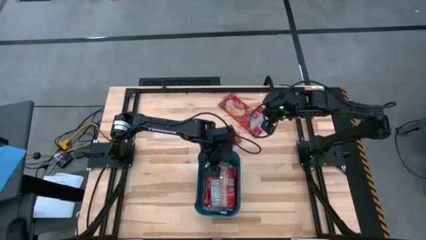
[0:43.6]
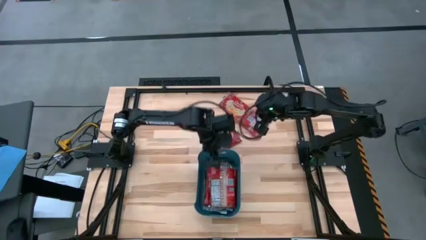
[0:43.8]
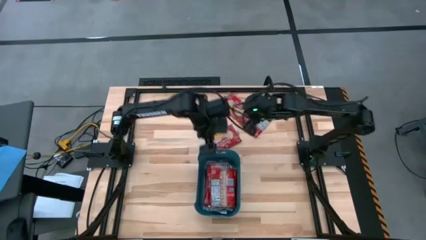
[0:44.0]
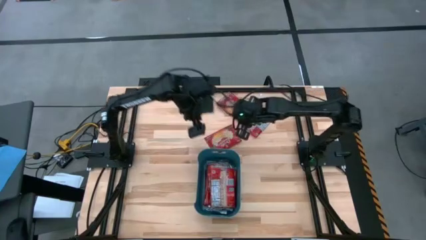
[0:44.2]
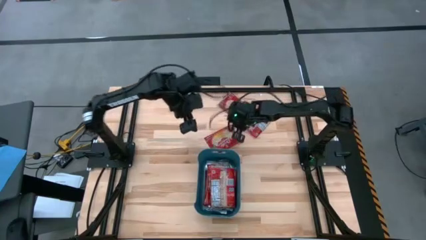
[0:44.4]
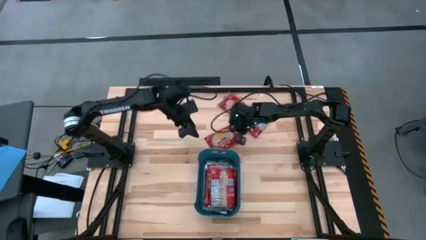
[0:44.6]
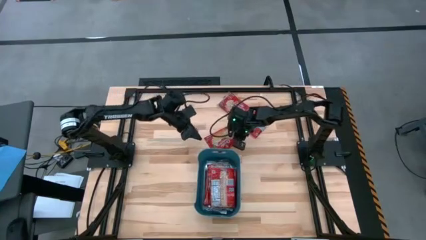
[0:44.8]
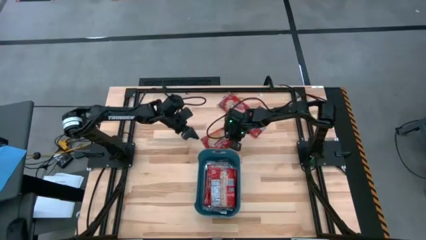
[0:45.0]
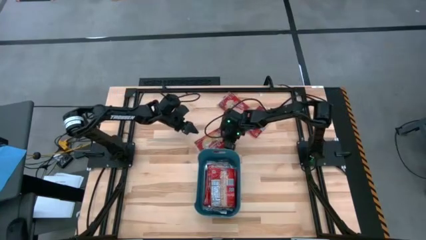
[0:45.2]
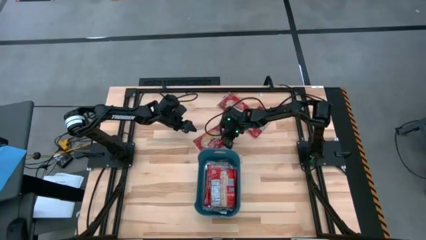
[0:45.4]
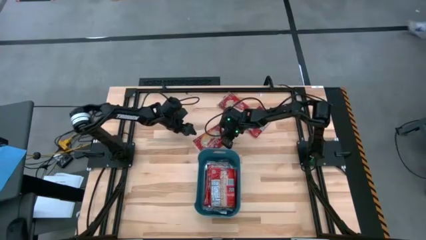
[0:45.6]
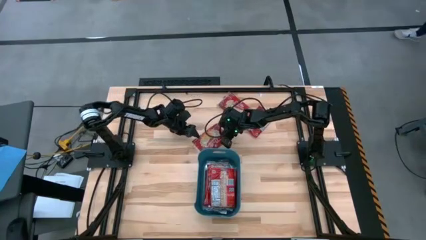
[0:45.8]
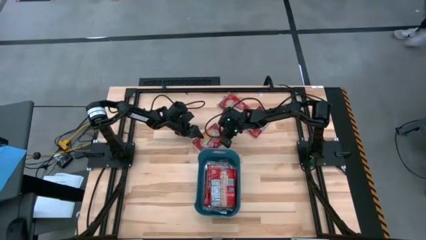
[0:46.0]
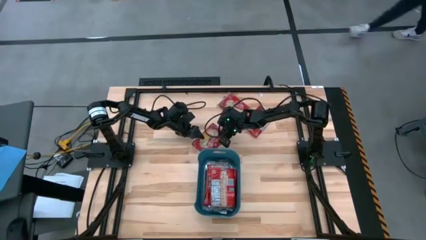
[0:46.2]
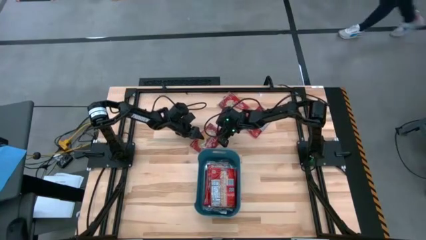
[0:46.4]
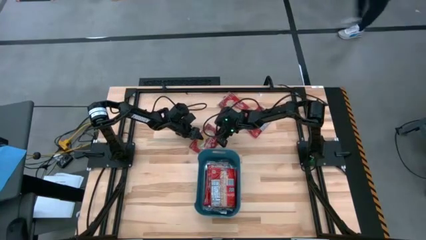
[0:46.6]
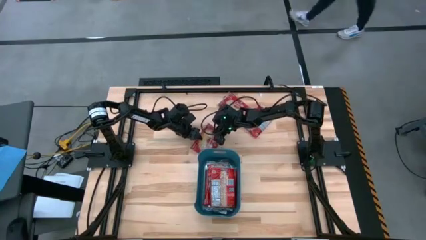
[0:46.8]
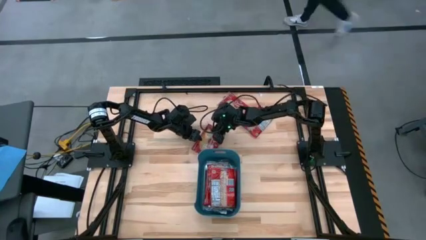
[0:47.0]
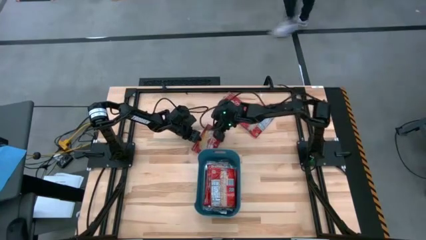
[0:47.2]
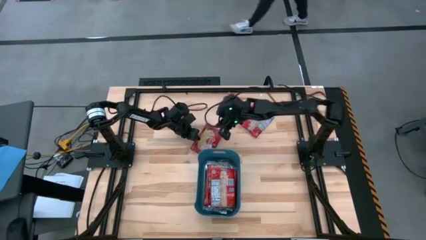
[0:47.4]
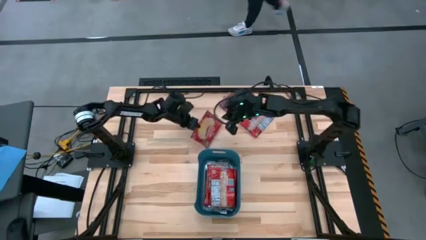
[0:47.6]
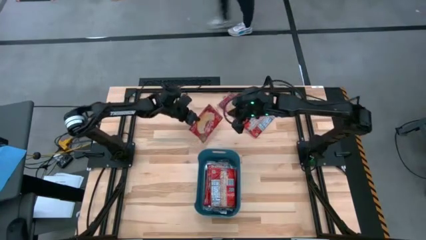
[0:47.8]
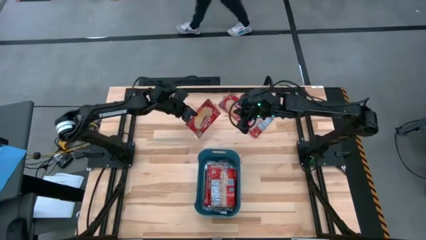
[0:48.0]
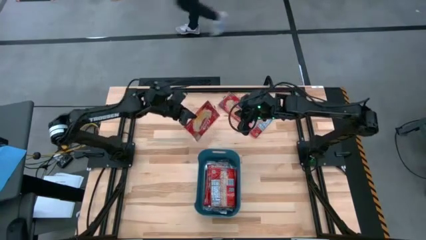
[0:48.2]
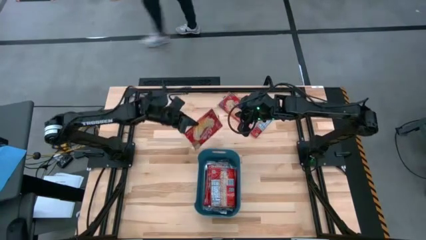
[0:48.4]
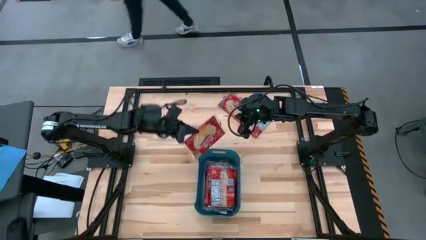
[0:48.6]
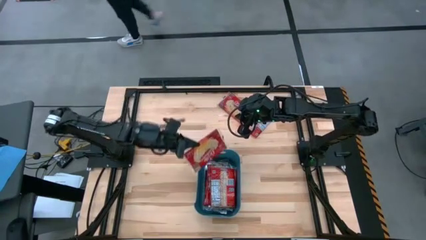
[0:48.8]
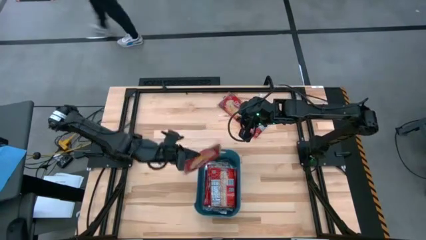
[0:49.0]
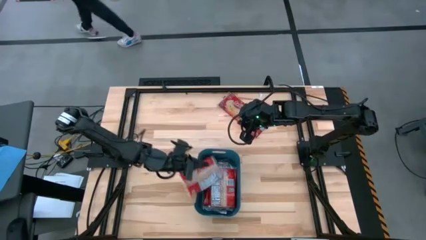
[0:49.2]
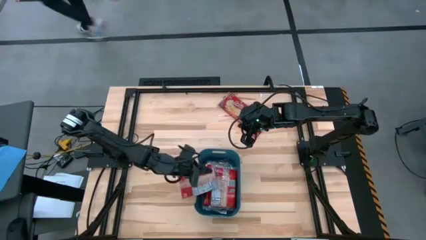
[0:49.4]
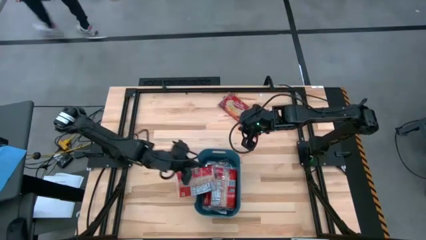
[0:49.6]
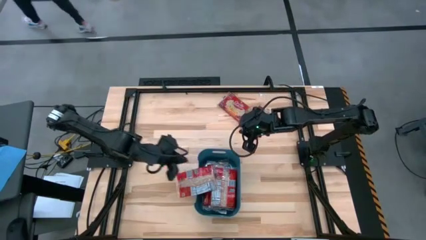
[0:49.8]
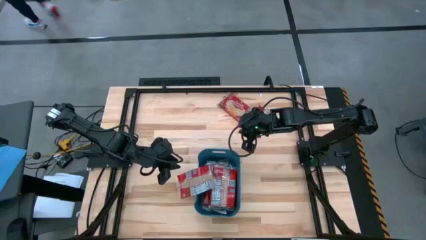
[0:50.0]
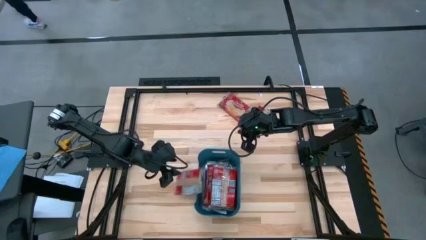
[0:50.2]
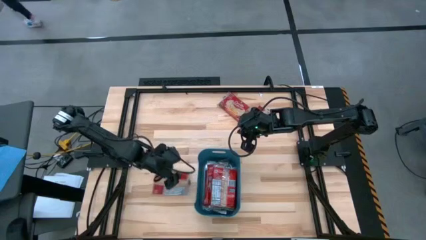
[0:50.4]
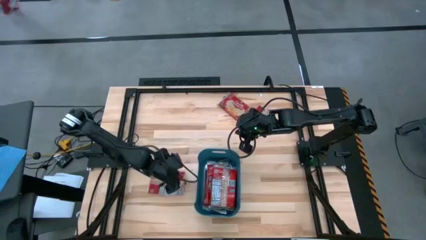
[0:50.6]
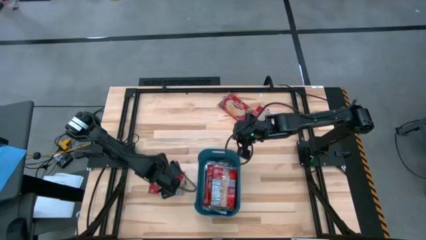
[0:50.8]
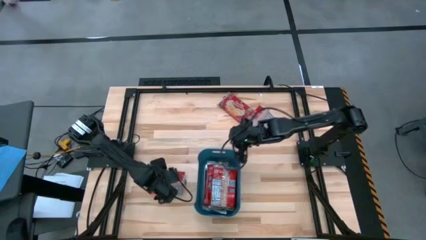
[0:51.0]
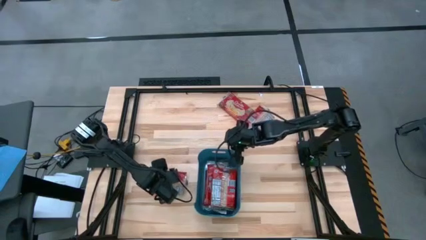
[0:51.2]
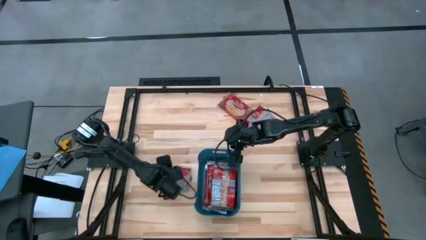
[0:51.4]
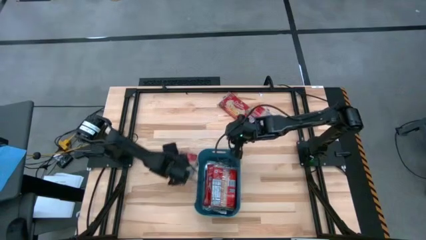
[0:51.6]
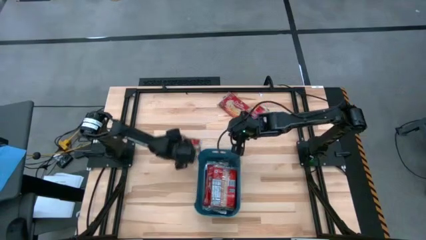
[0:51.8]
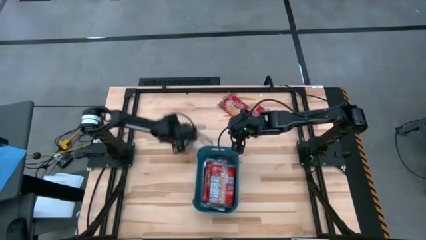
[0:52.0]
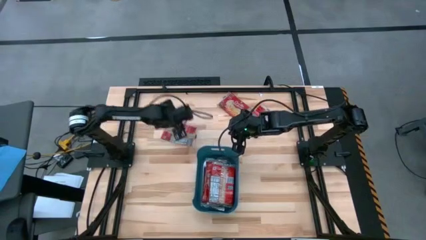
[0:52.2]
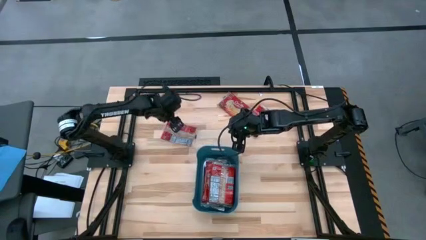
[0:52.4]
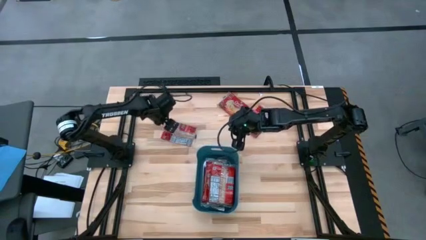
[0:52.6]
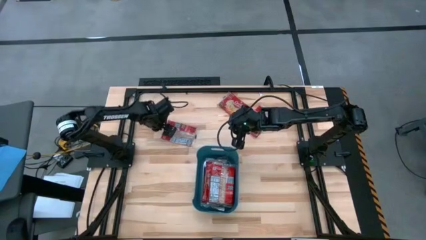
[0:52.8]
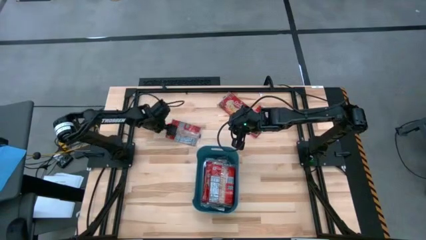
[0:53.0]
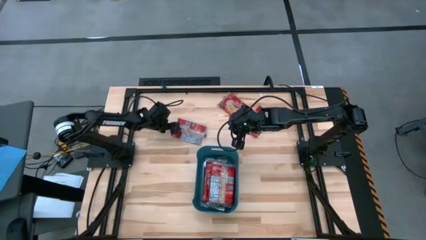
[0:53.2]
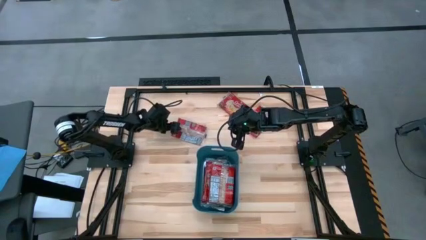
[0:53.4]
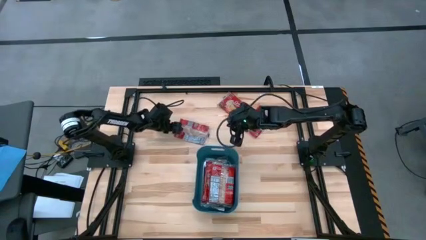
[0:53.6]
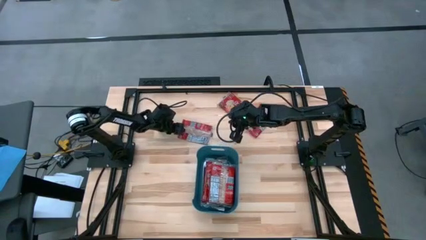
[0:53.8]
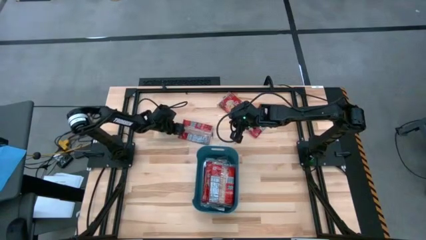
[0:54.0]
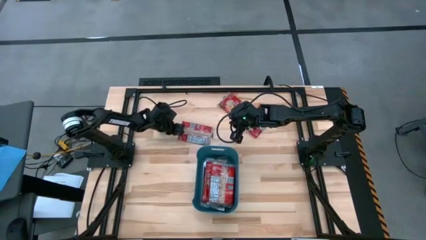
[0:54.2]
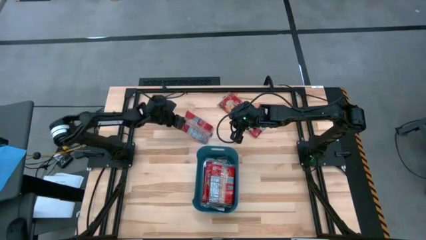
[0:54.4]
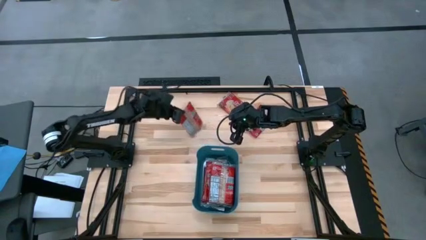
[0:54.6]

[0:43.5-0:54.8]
Task: Sort popcorn bags into baskets
Put the red popcorn pack into the blue container

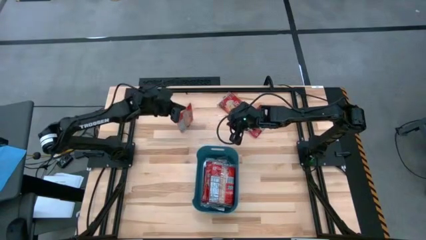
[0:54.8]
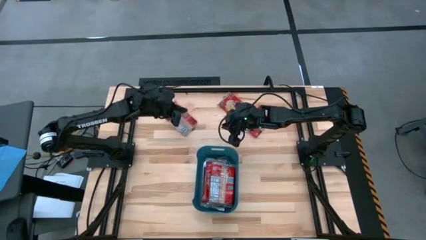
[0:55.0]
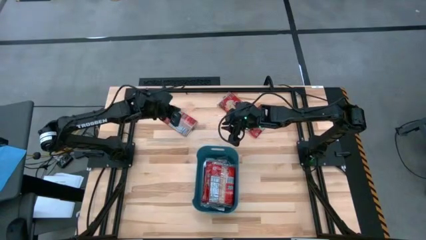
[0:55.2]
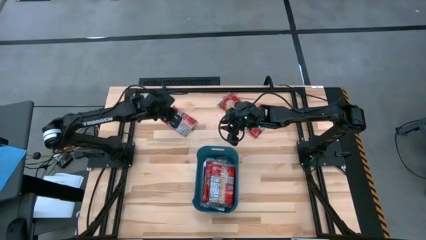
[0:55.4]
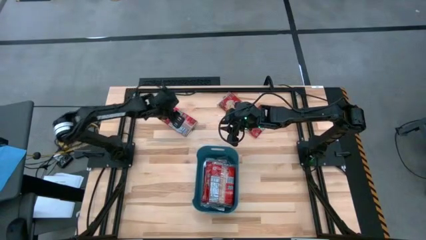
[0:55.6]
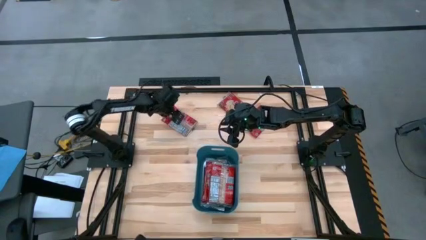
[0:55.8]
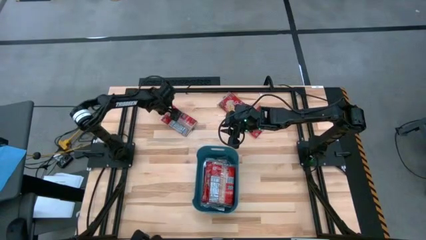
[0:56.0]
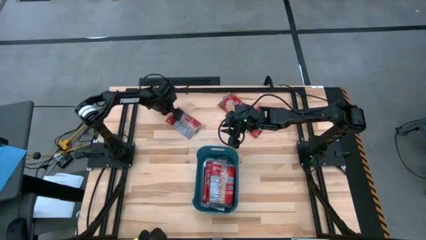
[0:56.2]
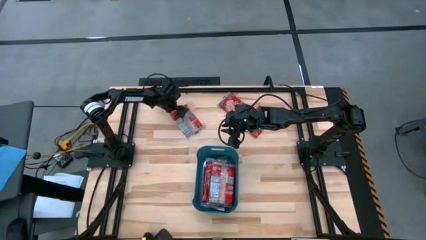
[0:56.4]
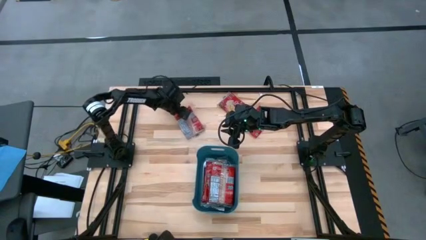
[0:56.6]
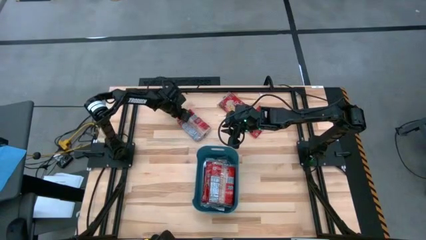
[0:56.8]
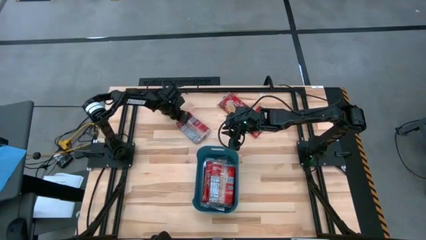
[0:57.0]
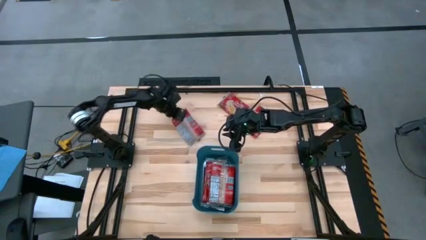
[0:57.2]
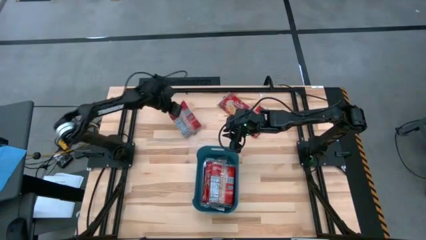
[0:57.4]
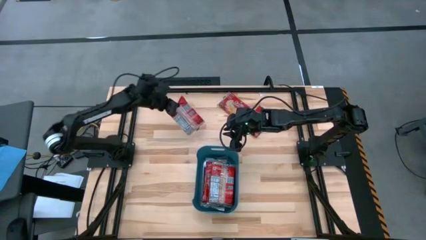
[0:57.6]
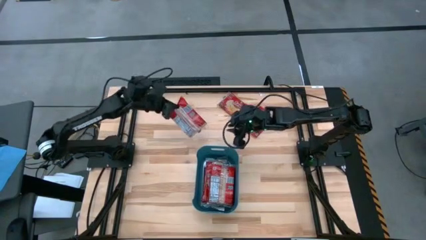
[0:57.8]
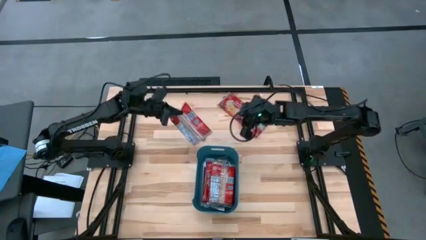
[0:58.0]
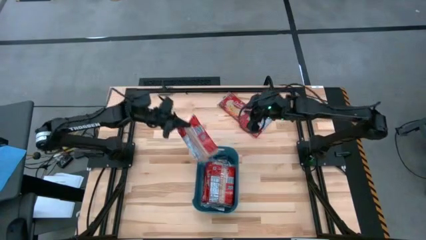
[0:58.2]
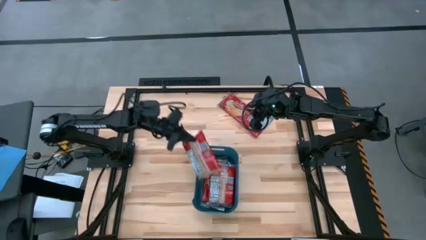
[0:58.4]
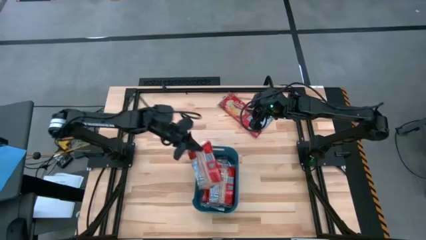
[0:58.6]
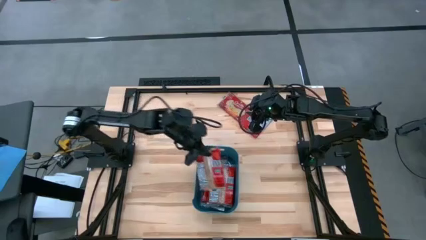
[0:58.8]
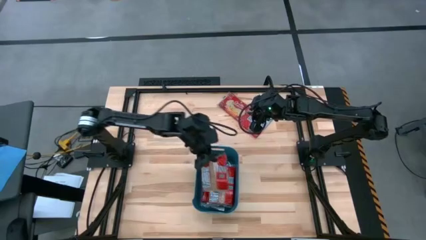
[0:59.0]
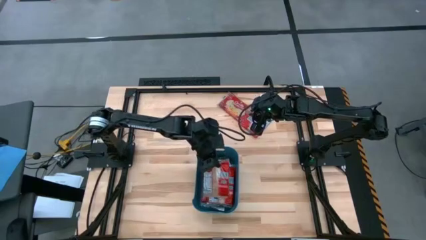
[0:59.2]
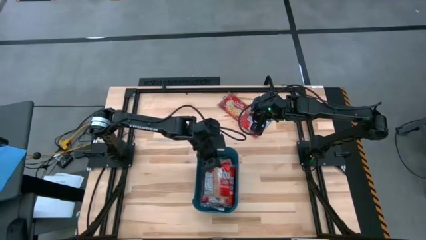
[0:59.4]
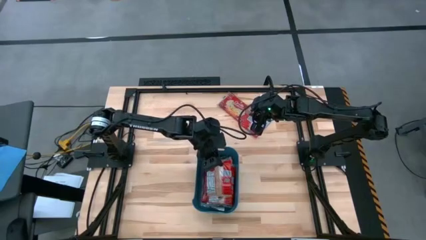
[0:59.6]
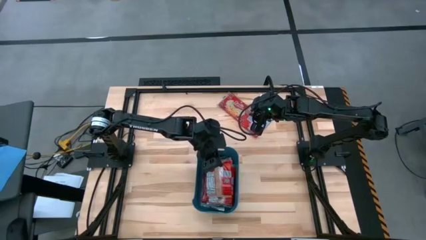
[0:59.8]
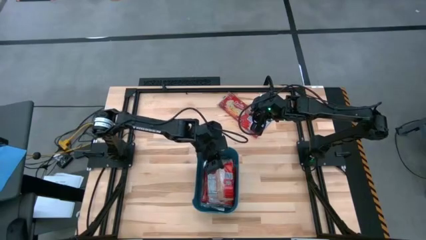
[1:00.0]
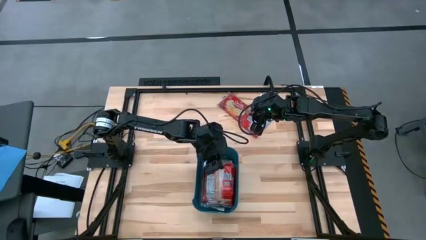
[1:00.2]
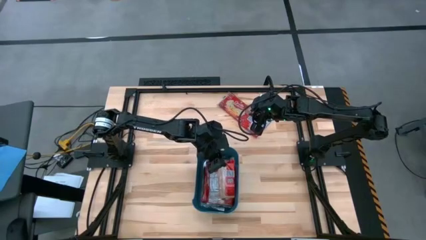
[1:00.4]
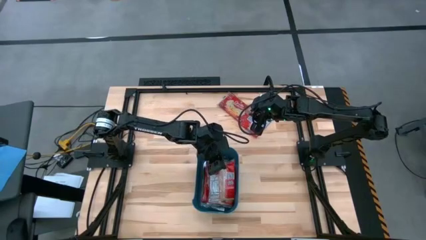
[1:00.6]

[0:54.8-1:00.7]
Put the red popcorn pack into the blue container
